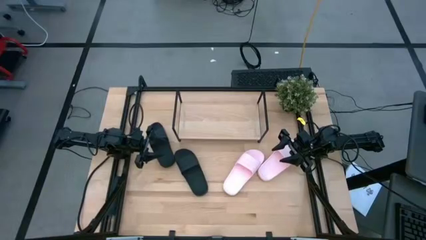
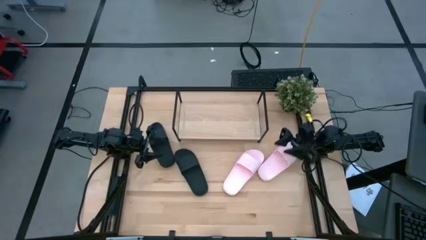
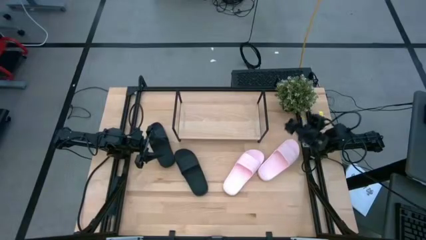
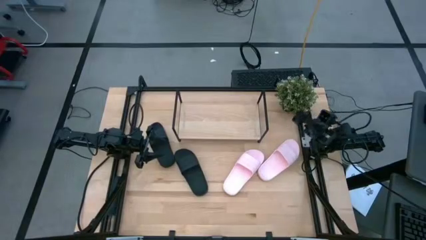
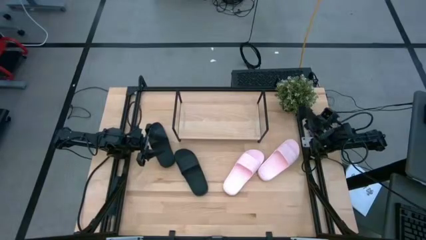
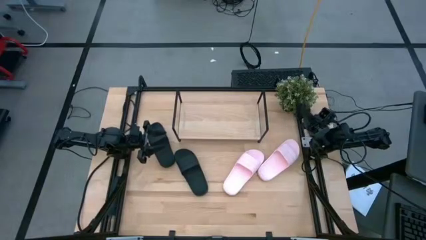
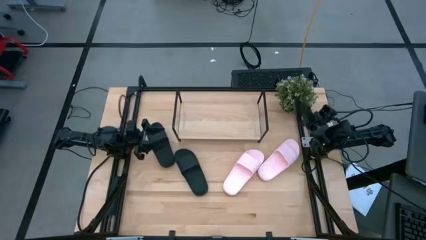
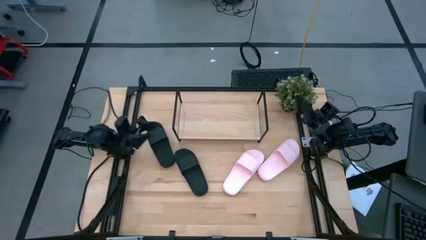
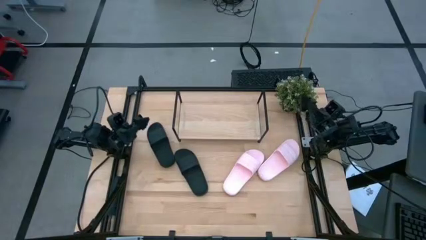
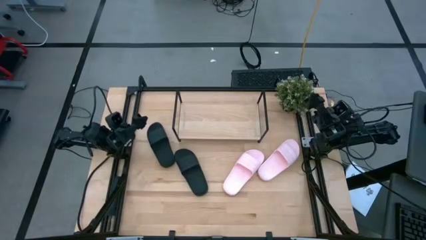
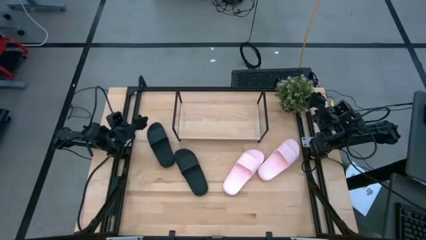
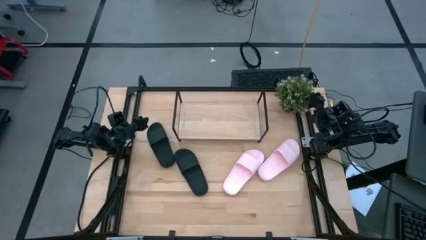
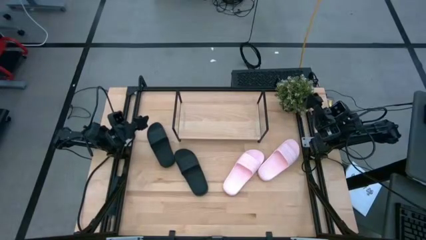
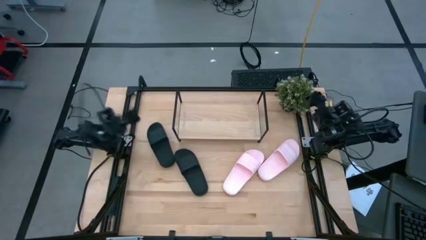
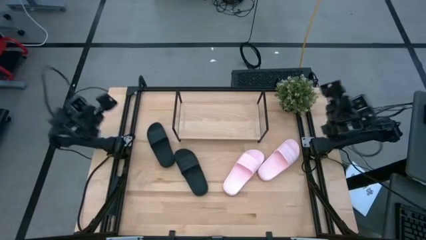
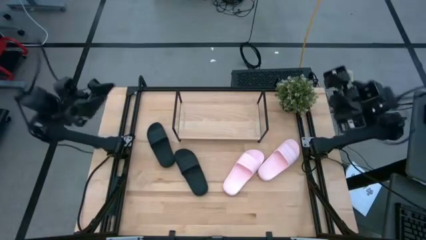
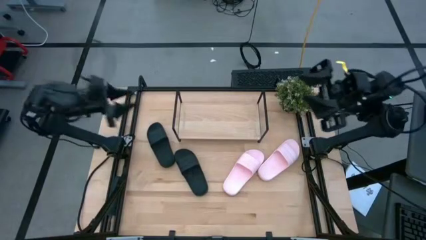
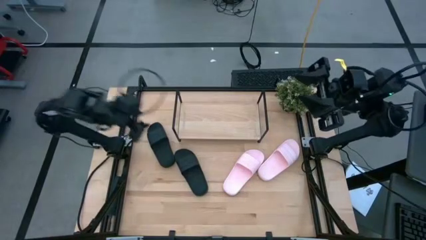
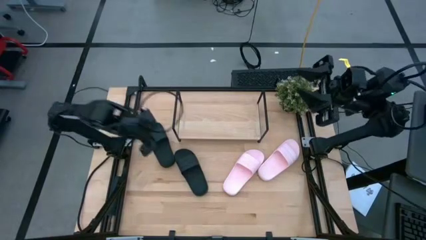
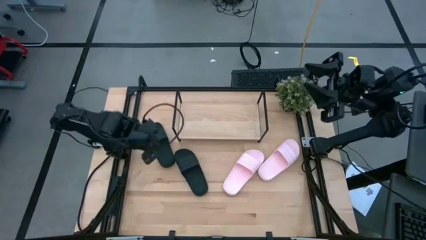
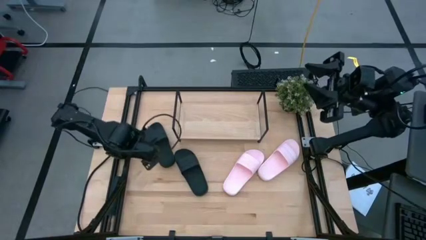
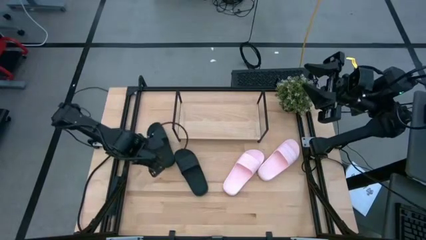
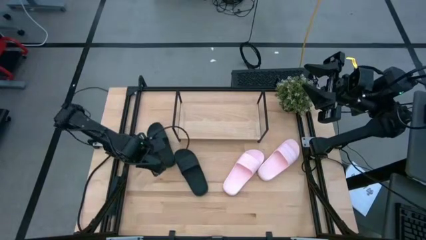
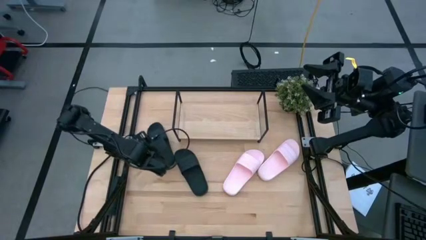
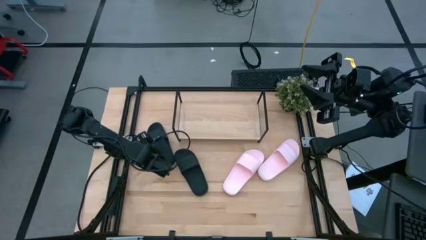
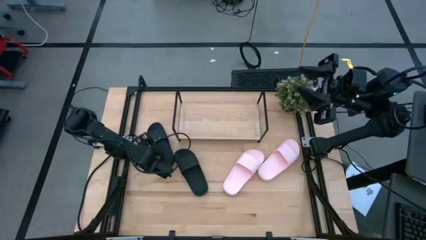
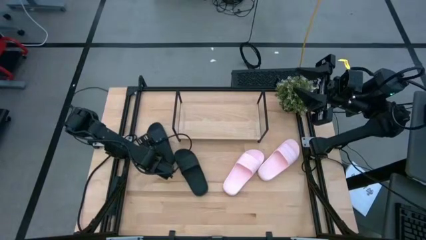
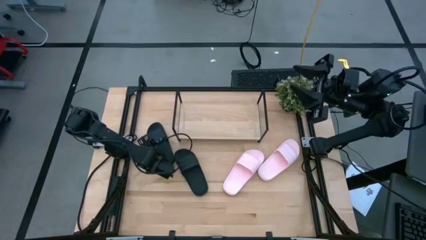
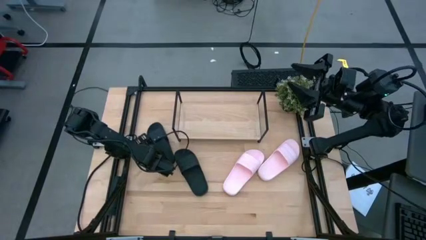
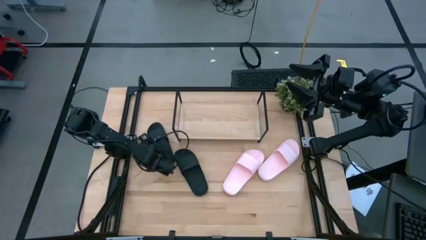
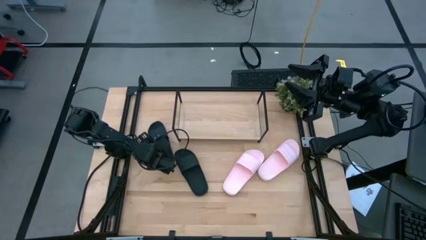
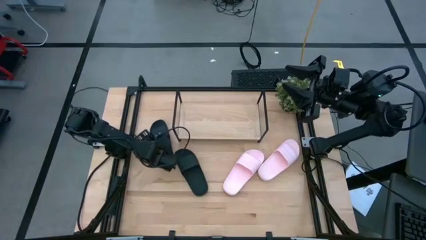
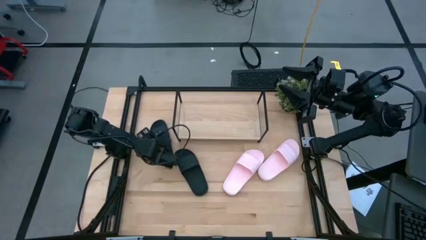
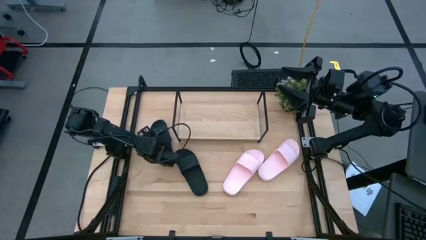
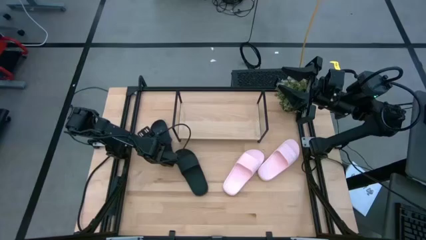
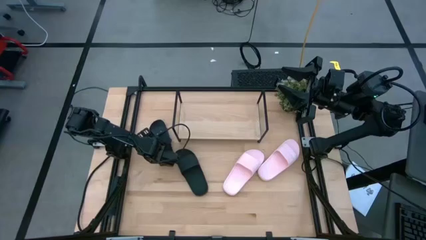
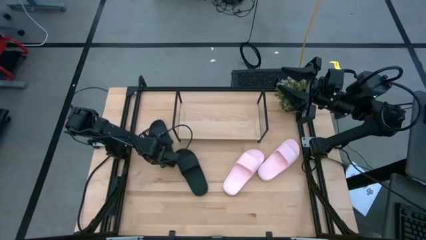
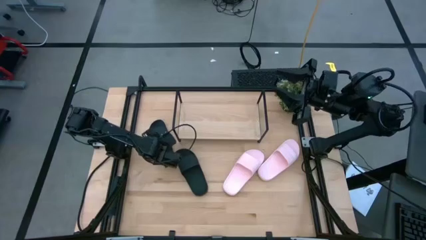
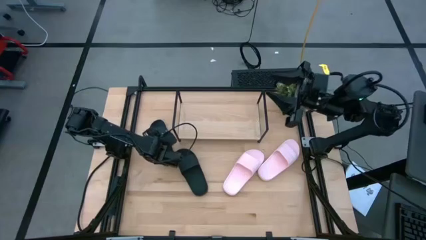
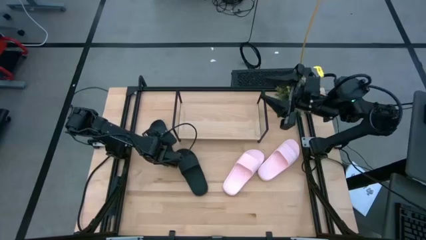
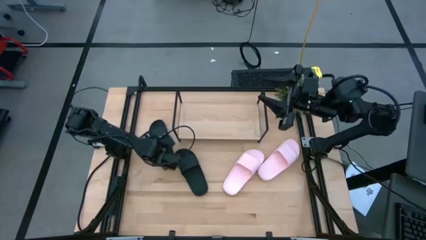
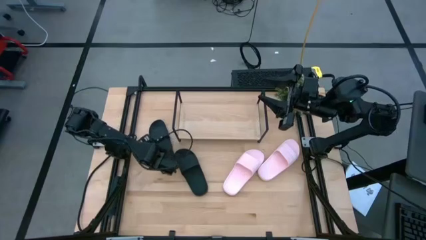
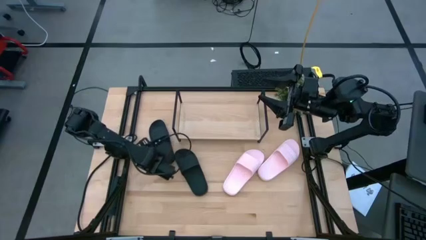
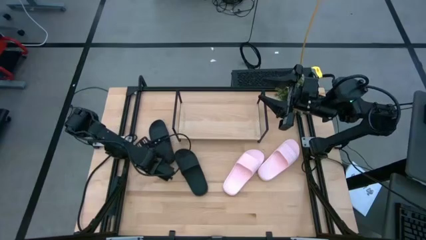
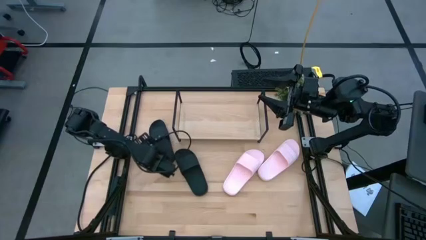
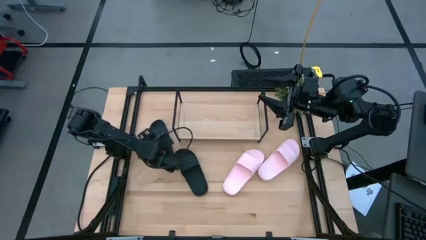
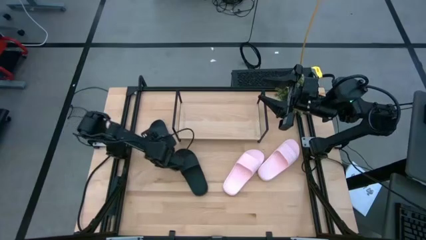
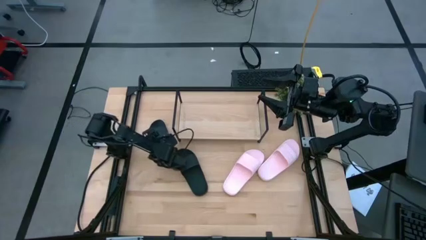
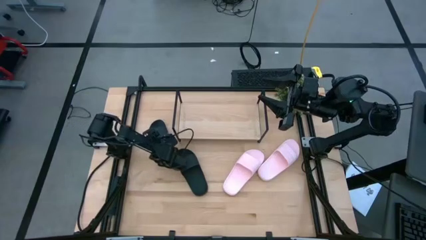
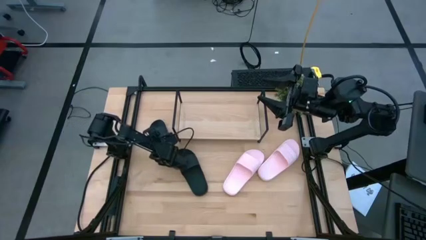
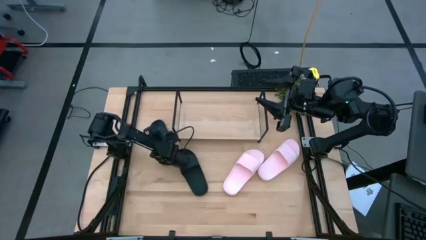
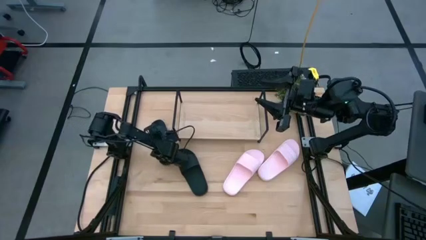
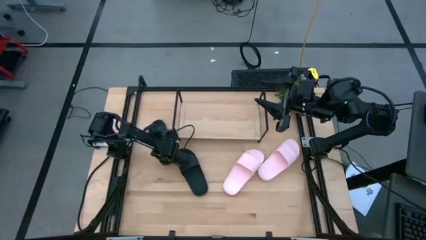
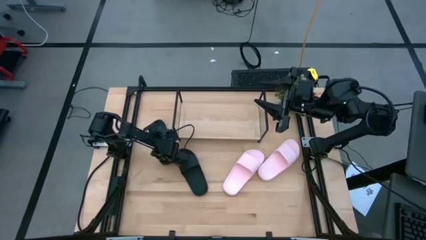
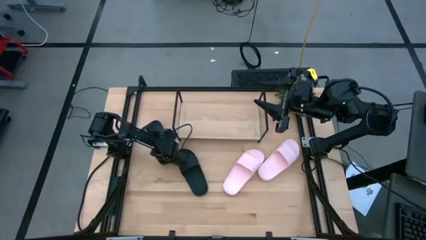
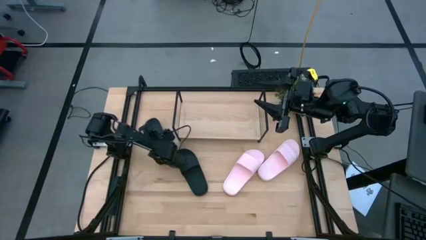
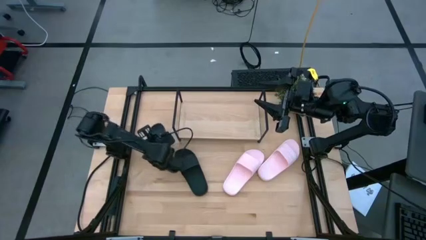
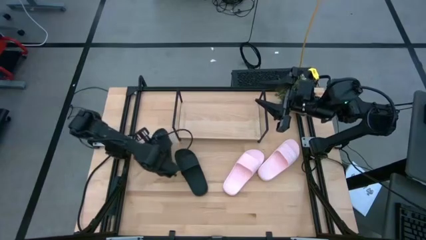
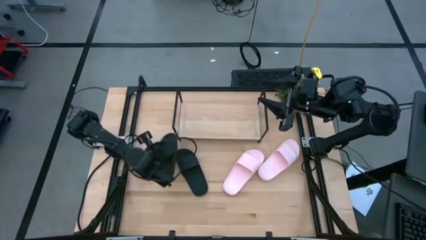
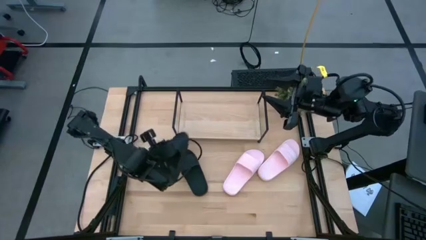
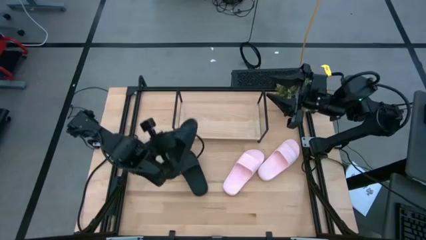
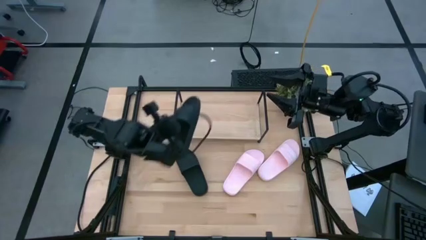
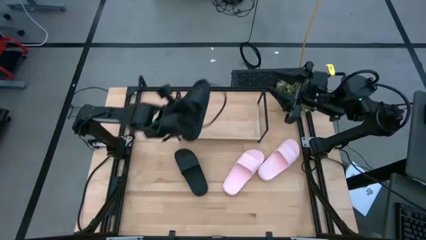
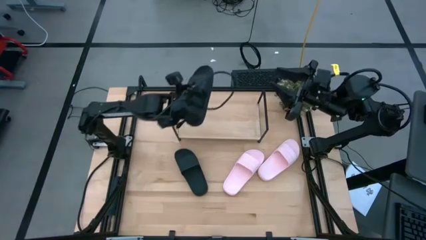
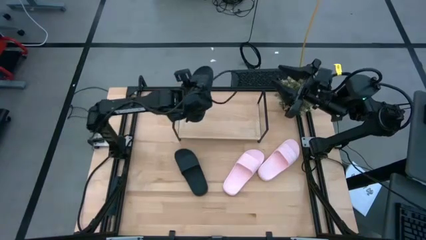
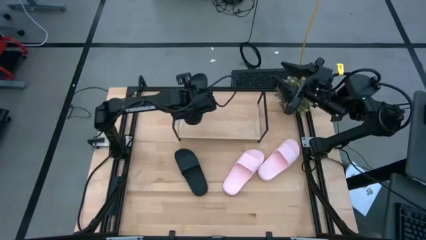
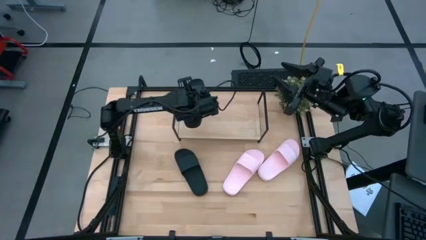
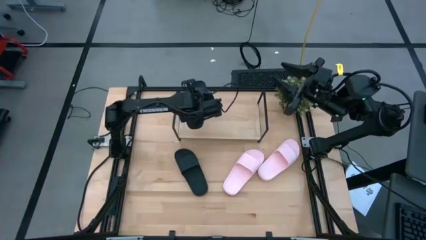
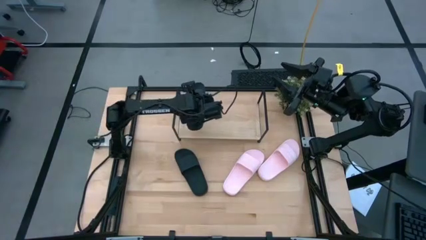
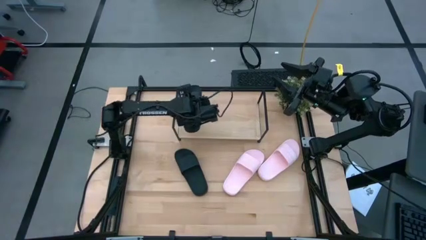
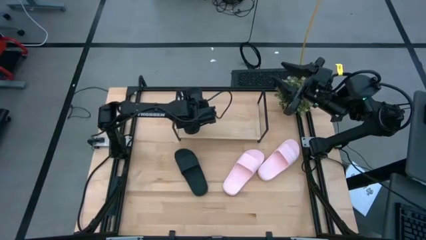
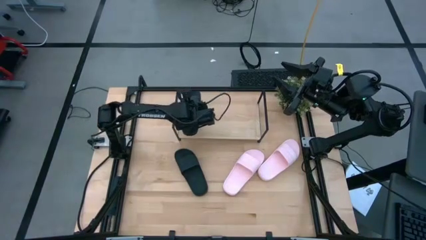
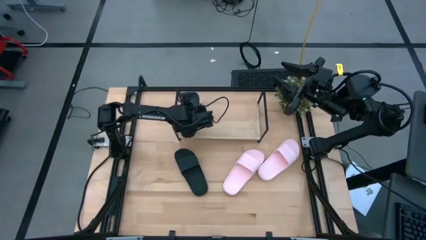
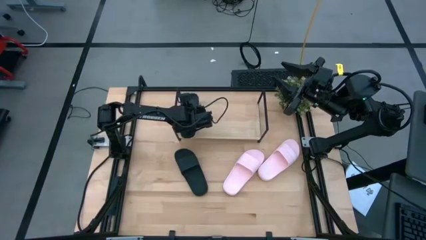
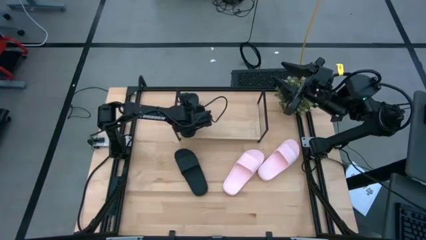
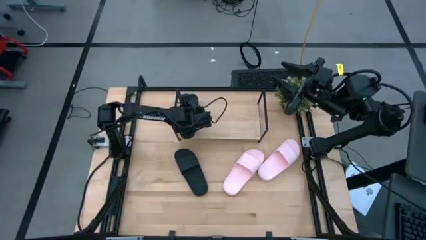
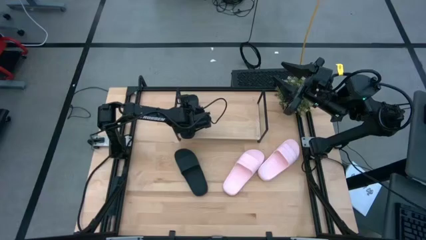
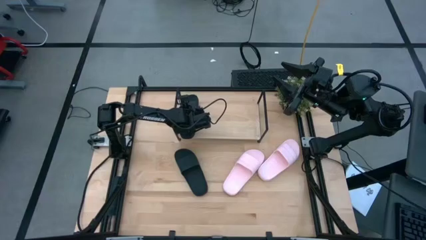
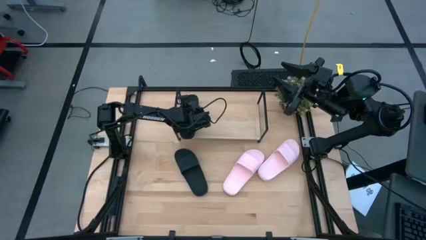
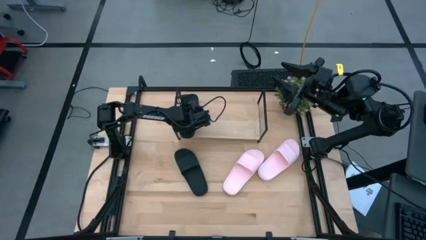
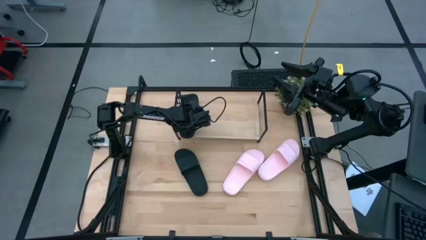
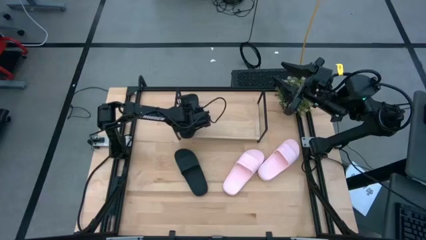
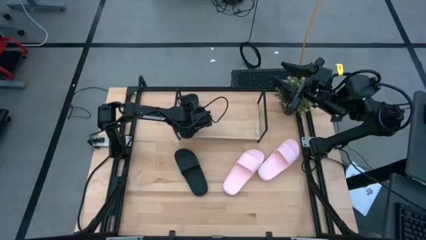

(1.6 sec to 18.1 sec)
Task: Pick and place slides into the shelf
Put the top black slipper on the shelf
